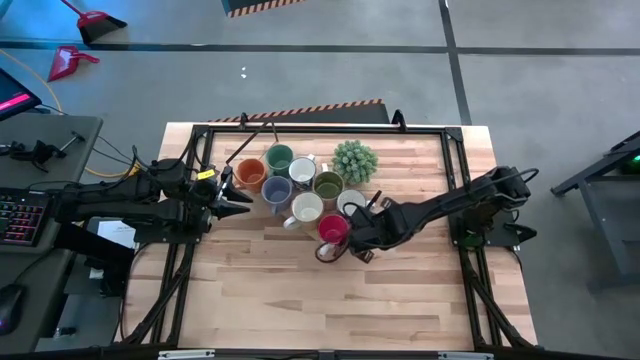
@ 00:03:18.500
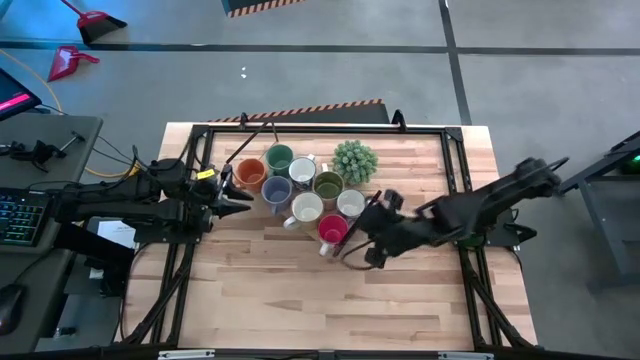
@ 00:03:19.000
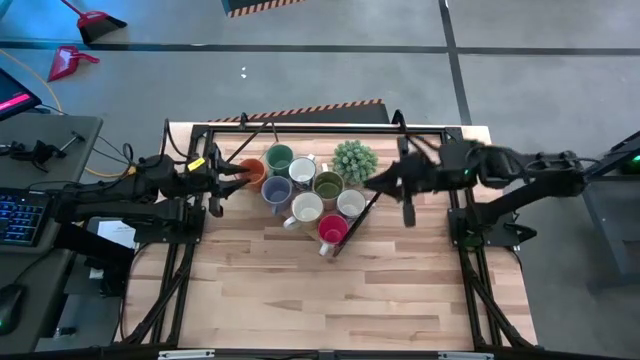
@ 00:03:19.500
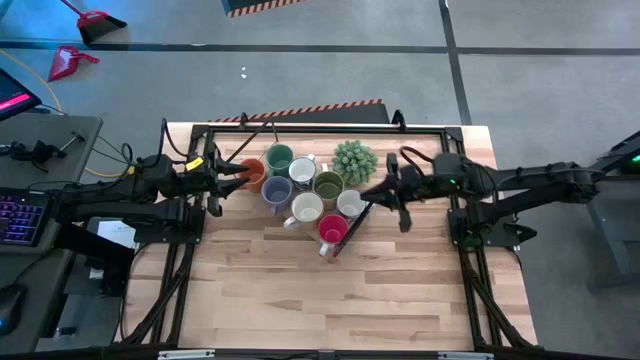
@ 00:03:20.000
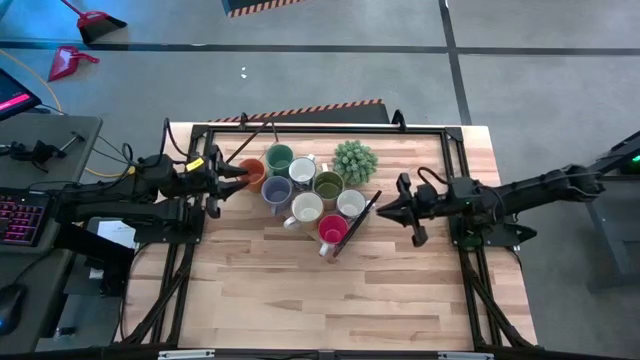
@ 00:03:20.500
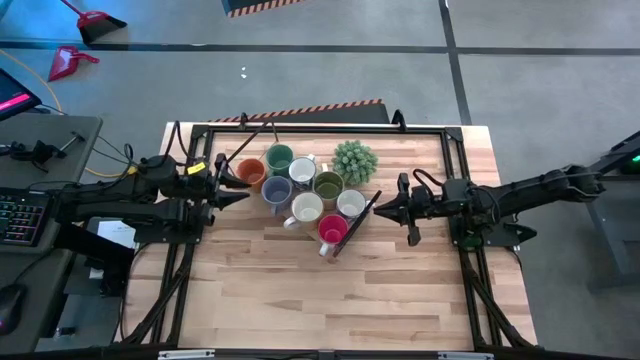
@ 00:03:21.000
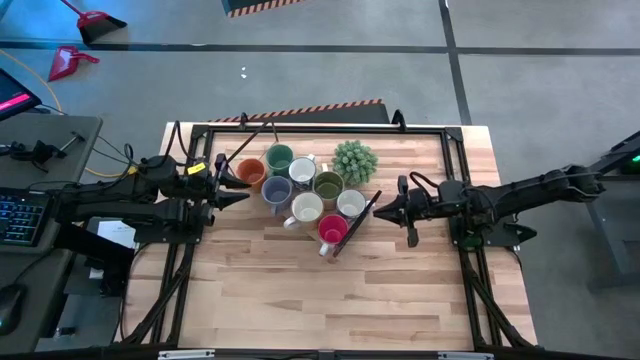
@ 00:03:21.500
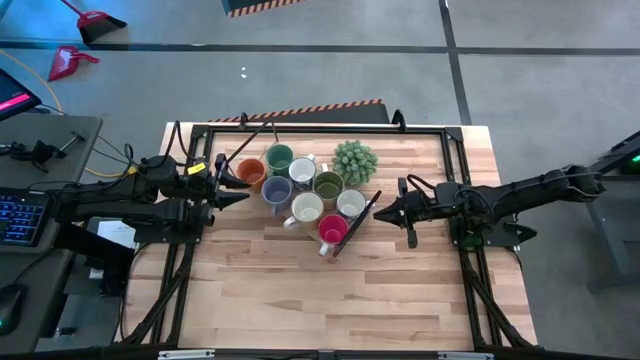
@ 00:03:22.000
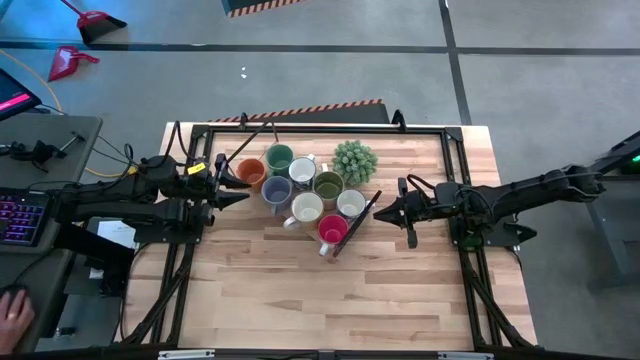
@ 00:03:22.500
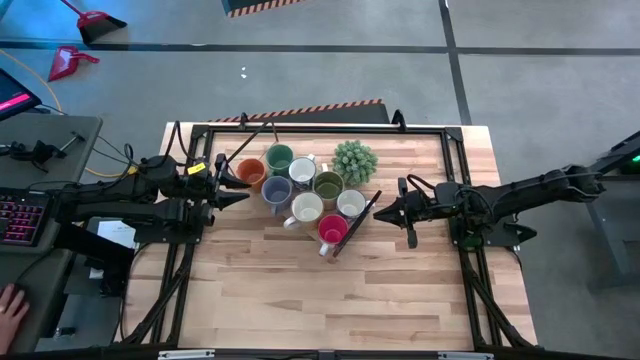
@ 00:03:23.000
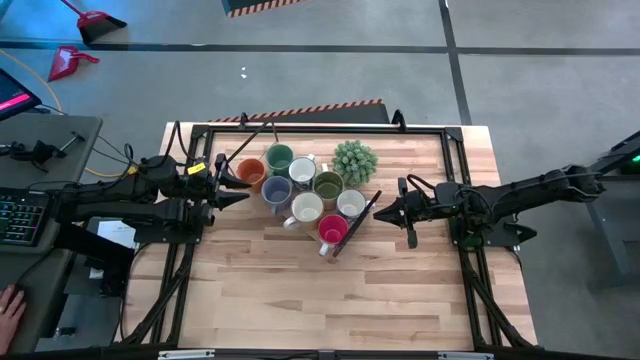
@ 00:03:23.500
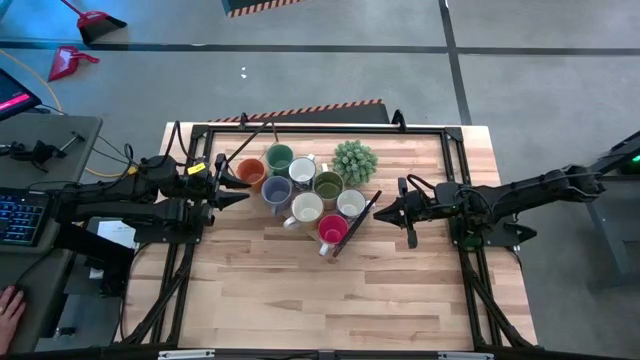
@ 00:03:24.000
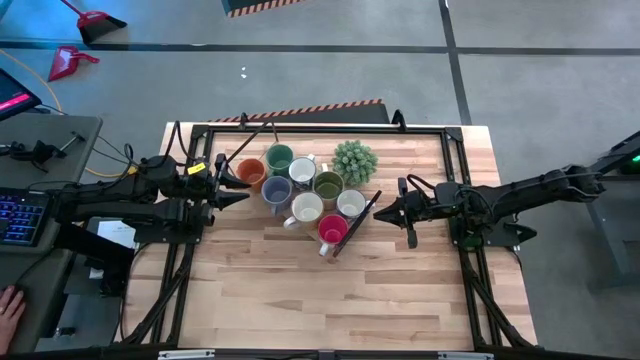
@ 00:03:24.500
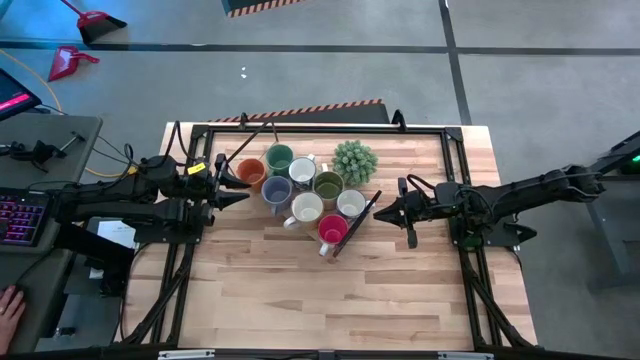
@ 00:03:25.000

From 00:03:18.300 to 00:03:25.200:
Task: Place coffee mugs
Return to Home Position

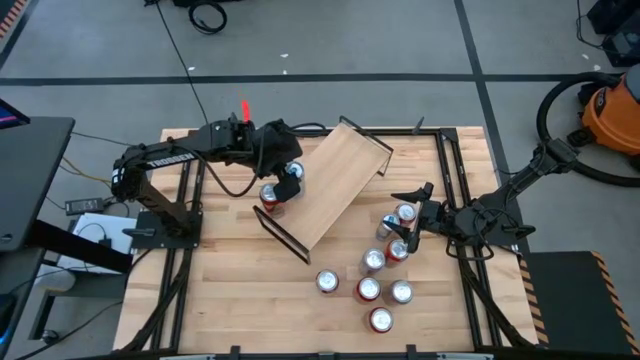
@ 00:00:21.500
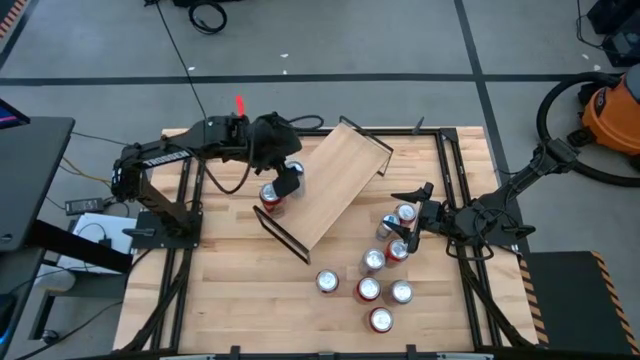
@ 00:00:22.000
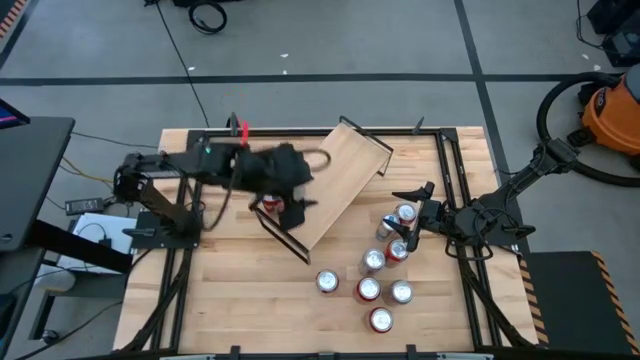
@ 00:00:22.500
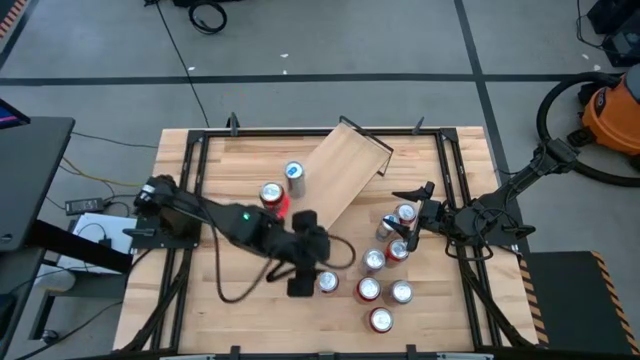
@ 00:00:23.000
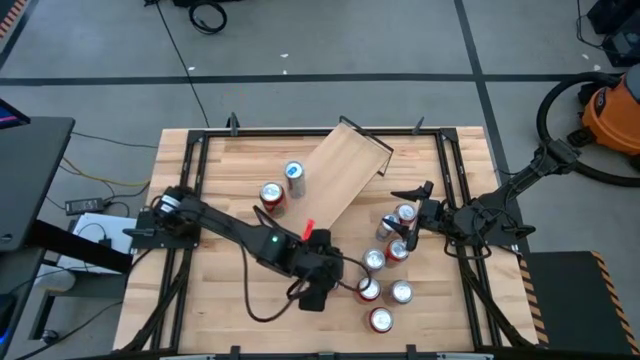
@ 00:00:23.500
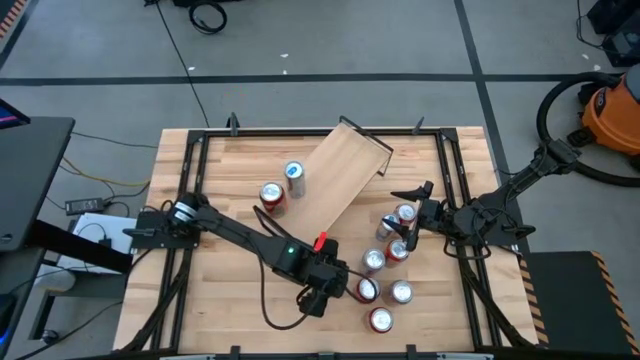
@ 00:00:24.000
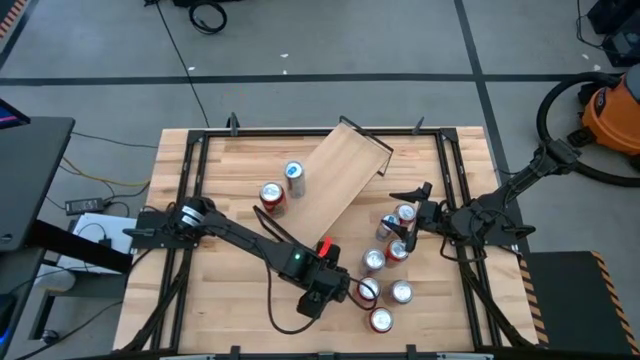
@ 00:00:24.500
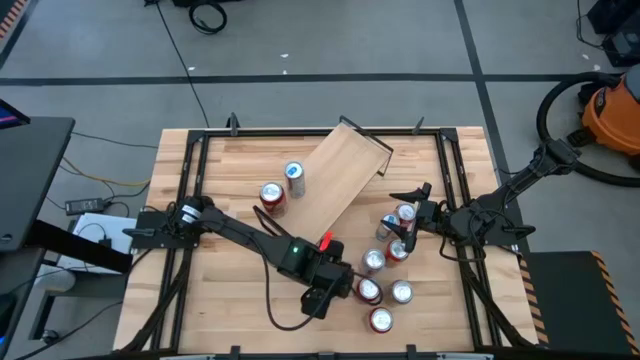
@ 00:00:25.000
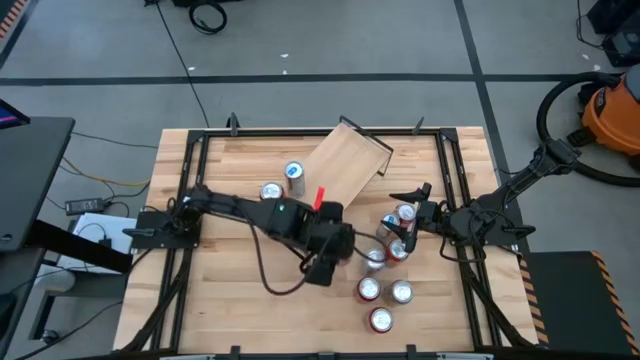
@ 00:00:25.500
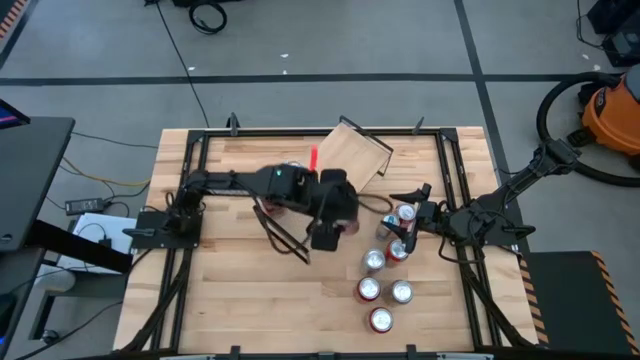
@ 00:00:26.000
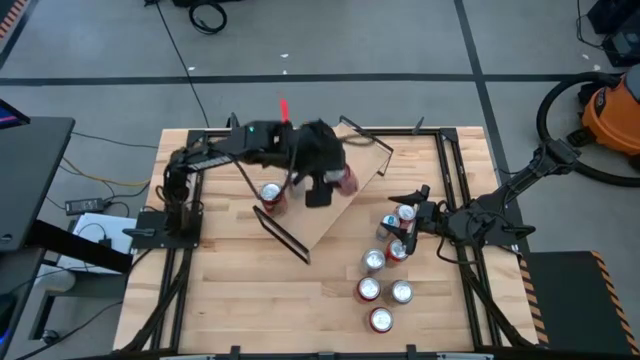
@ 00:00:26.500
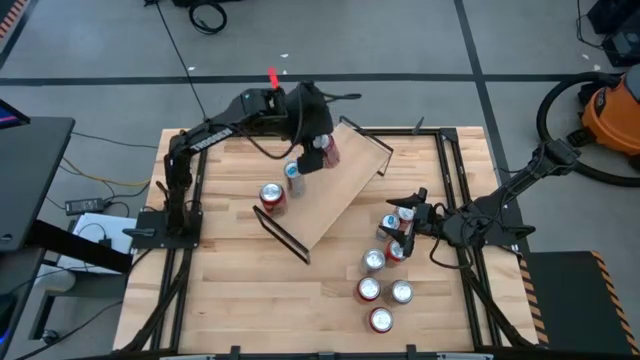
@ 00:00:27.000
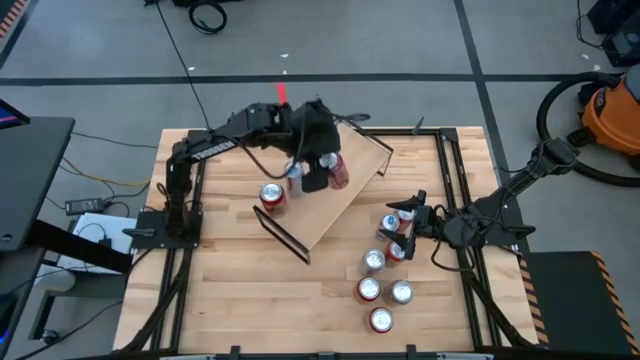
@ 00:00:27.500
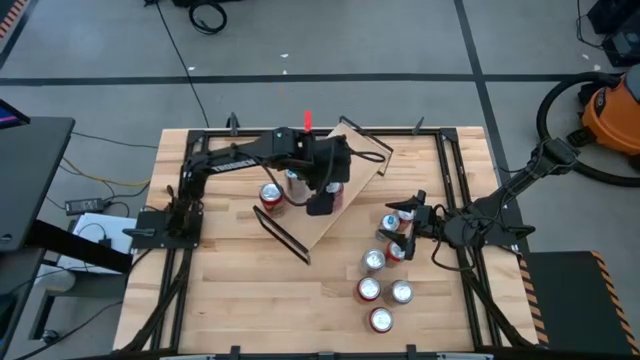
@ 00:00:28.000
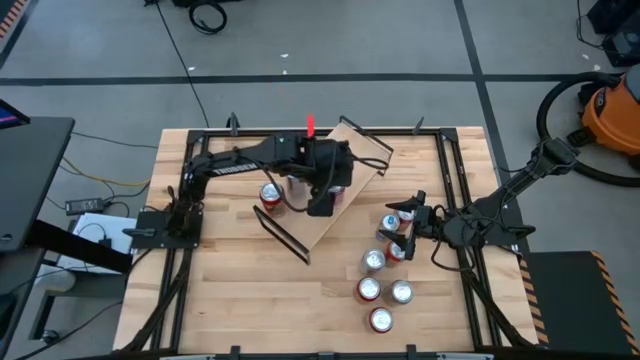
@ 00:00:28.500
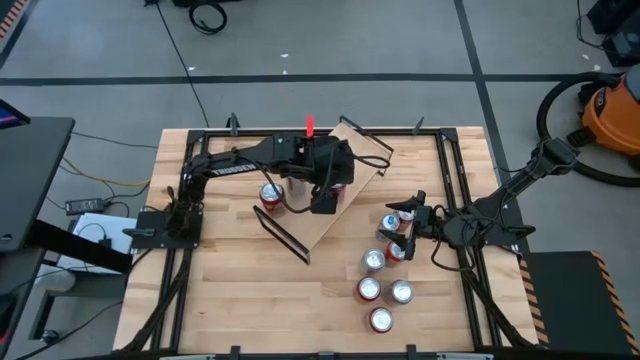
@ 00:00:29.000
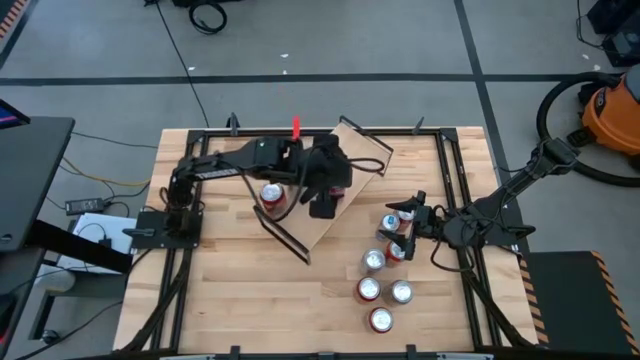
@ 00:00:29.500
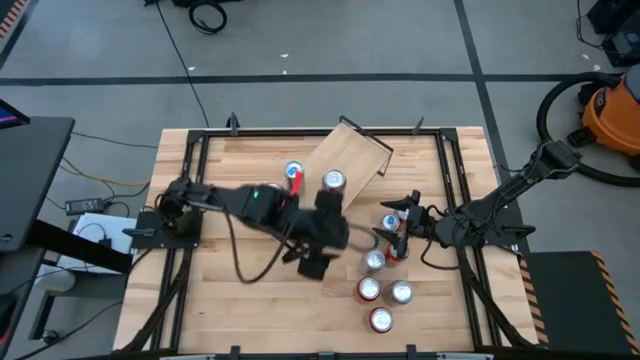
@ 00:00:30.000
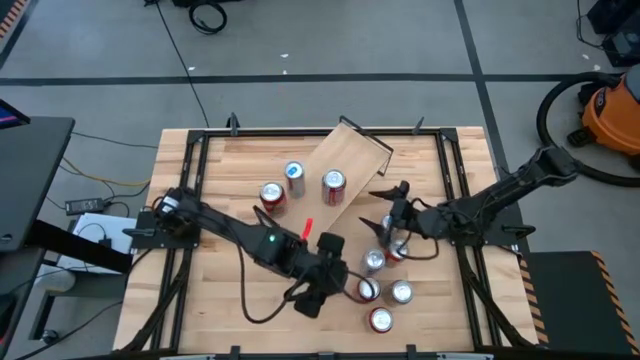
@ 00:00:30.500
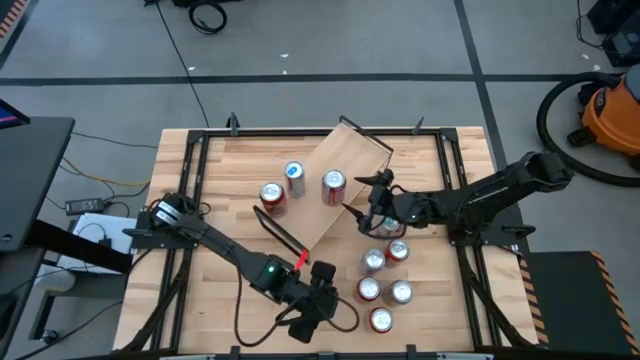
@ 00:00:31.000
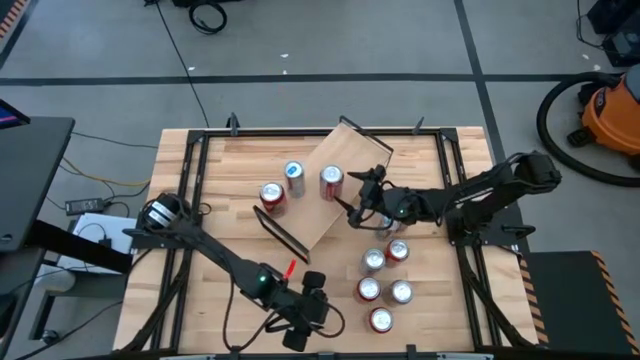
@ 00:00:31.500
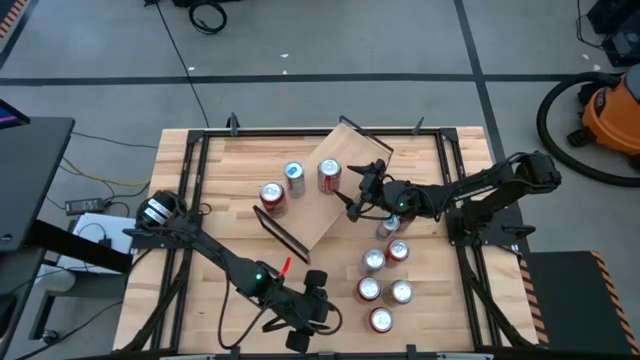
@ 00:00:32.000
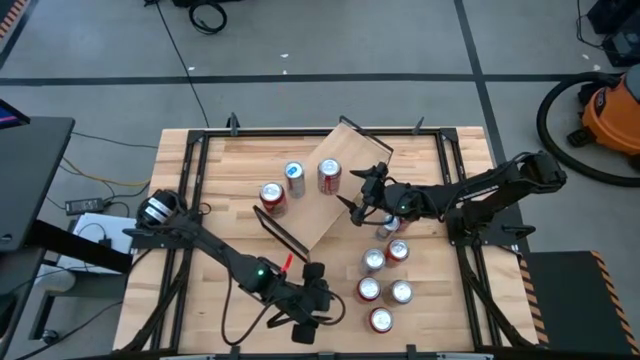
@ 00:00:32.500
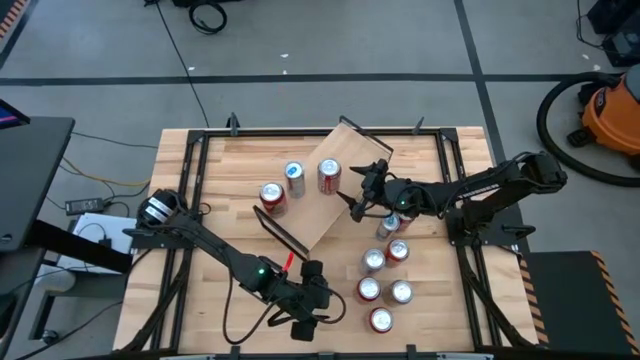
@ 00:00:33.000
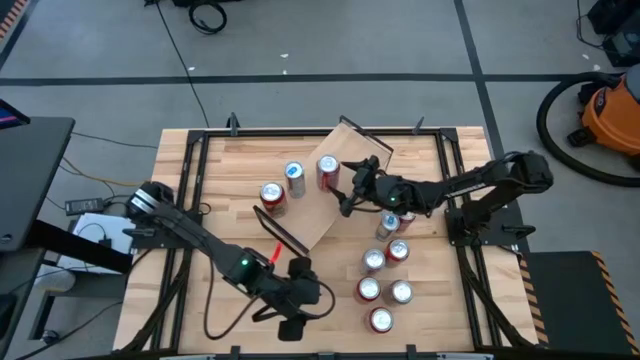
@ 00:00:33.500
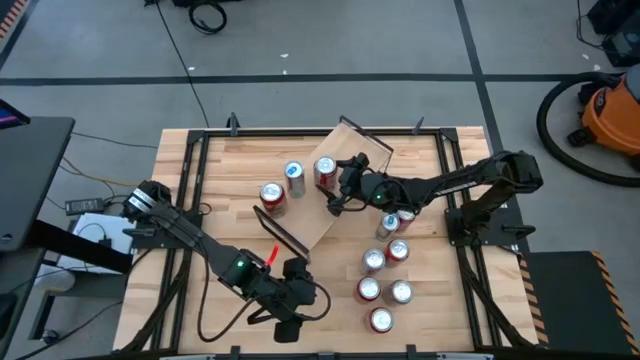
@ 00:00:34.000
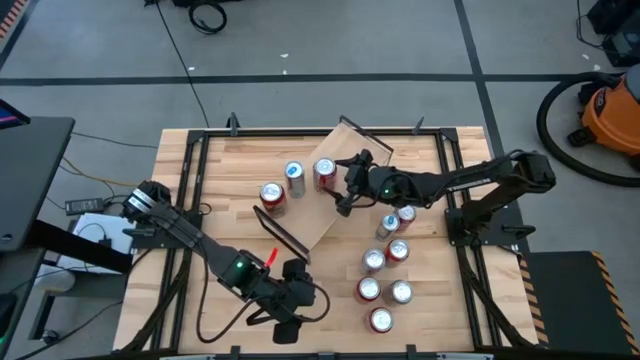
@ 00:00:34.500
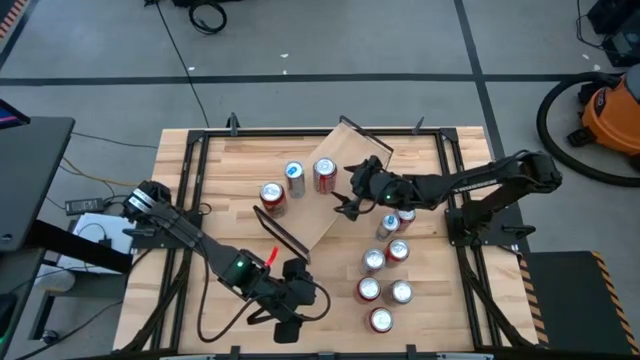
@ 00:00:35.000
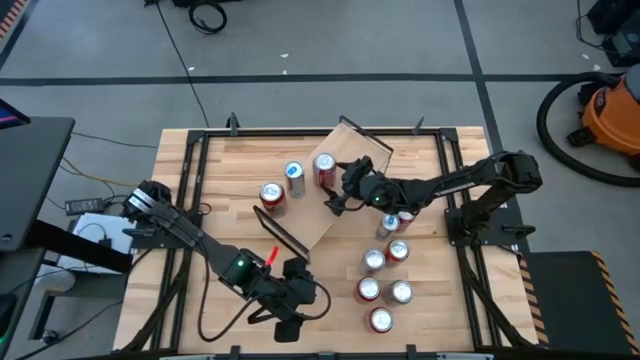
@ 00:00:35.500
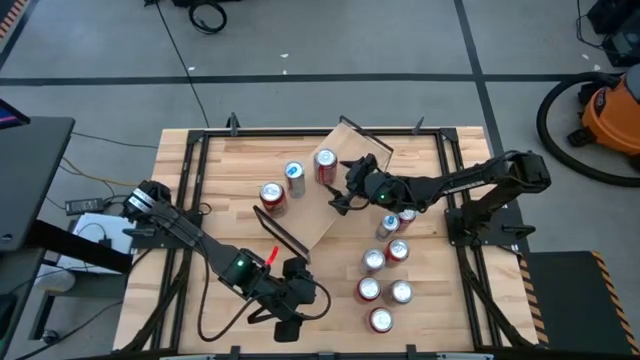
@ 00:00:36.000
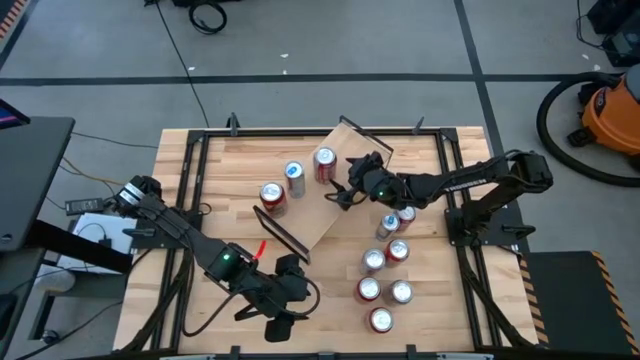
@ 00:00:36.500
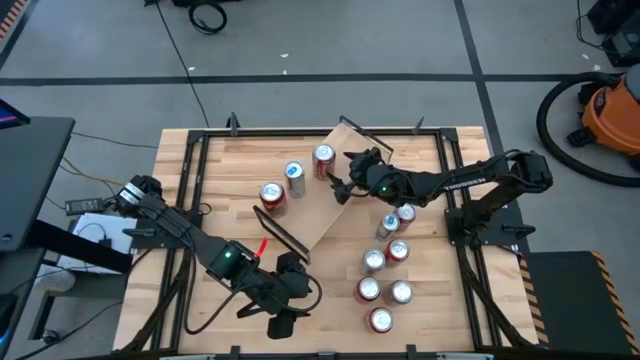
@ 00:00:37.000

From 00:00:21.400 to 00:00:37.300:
Task: Place canned beverage on shelf
Put the bottom red-white soda can on the shelf
